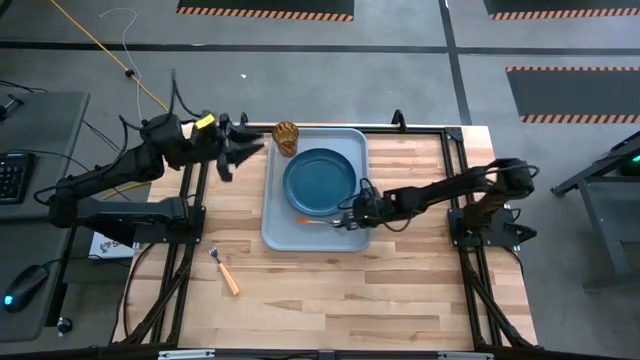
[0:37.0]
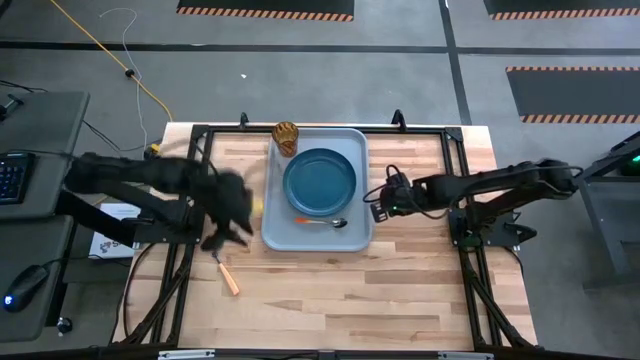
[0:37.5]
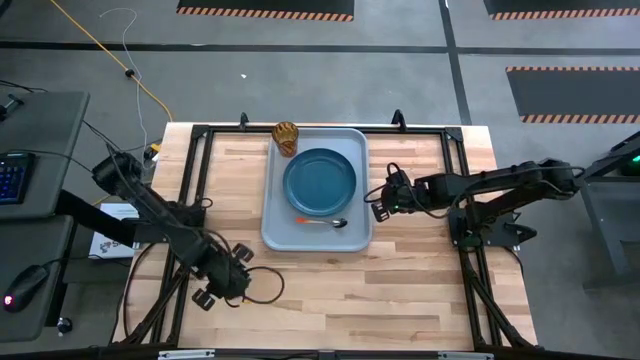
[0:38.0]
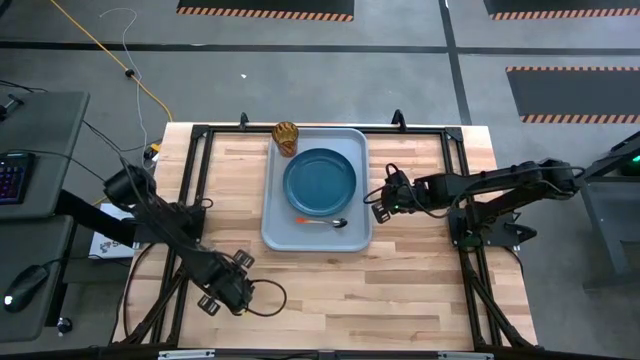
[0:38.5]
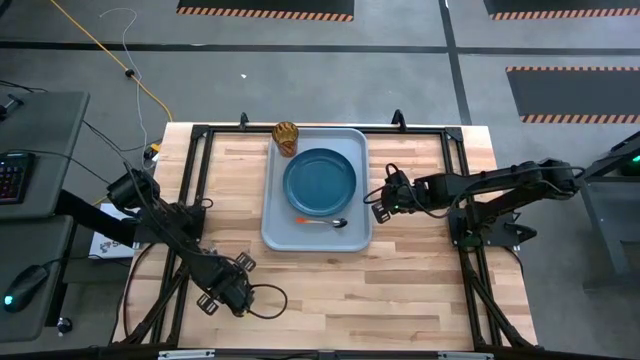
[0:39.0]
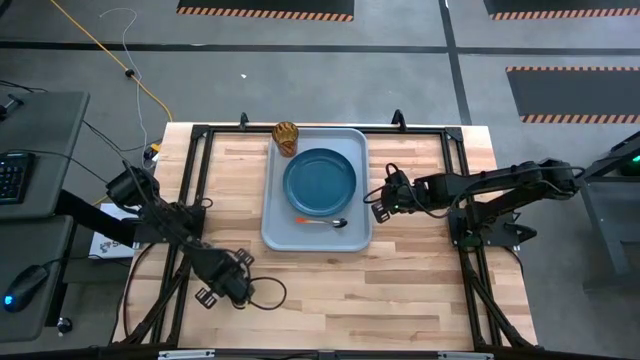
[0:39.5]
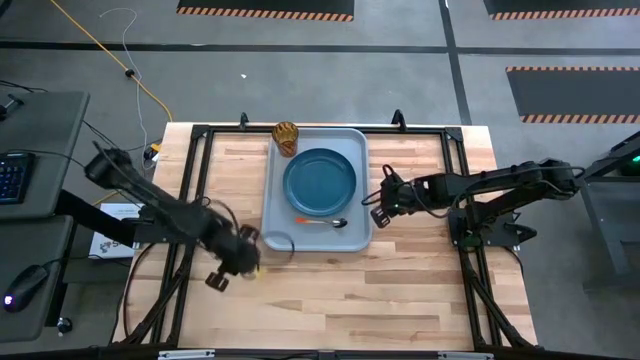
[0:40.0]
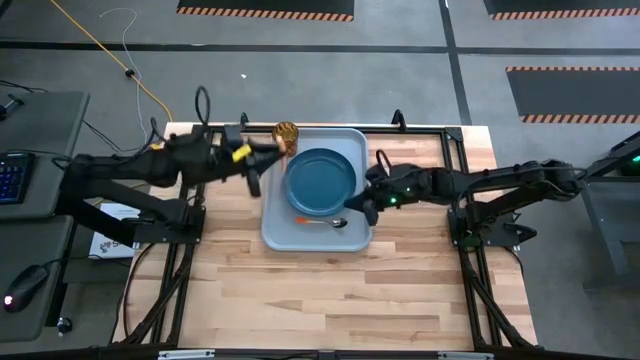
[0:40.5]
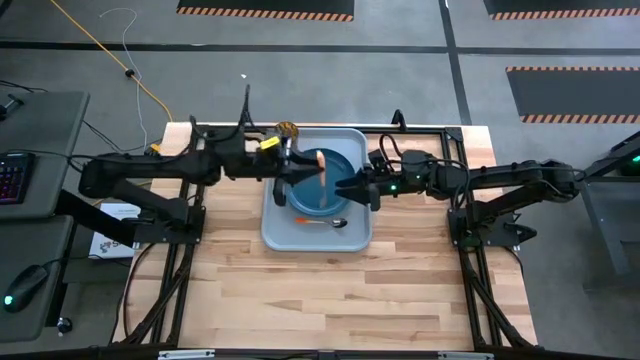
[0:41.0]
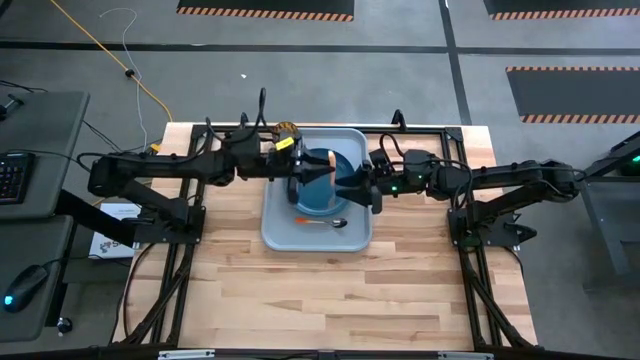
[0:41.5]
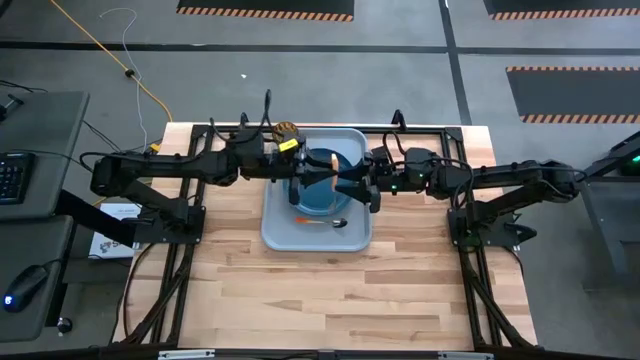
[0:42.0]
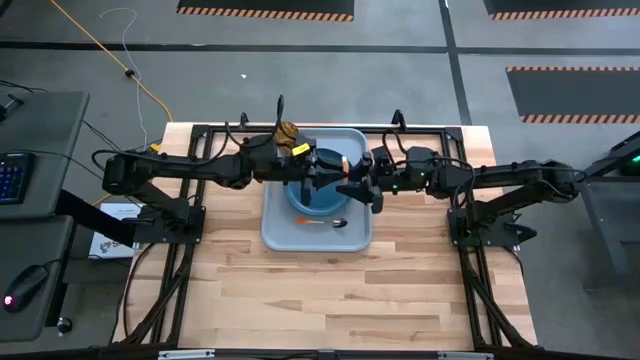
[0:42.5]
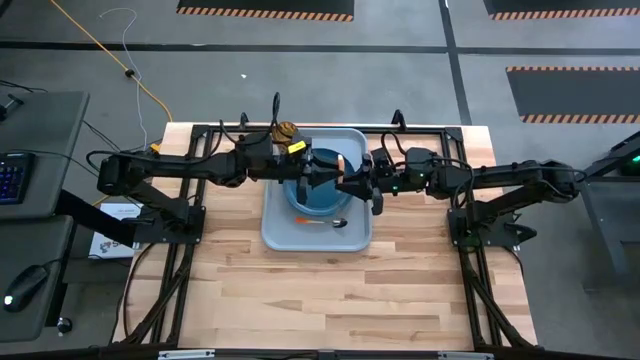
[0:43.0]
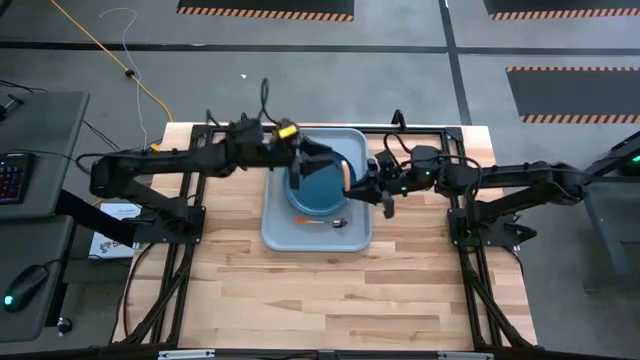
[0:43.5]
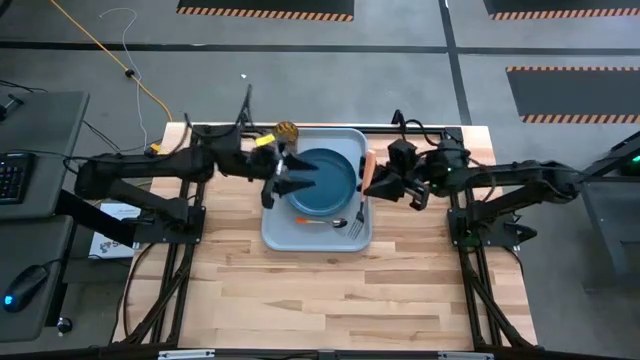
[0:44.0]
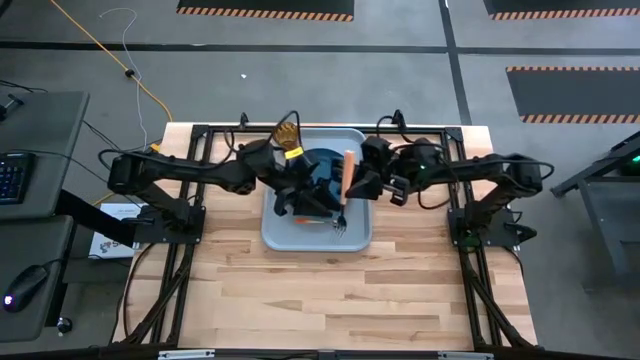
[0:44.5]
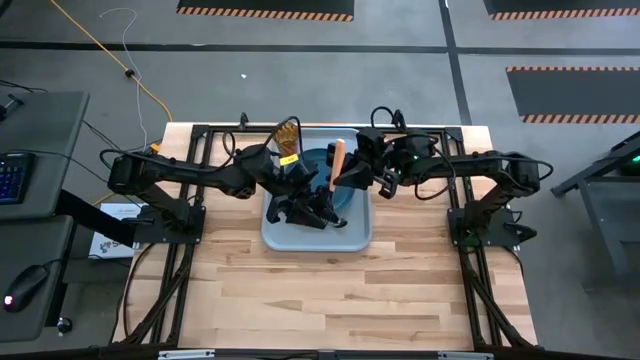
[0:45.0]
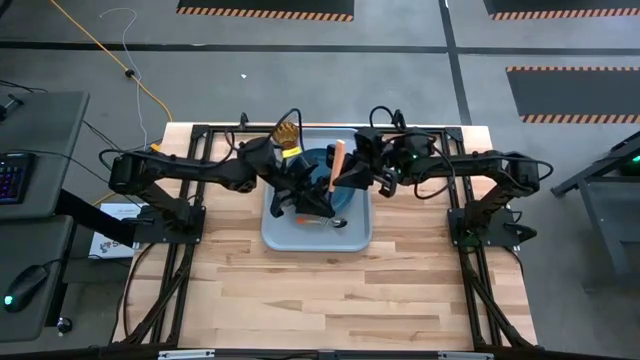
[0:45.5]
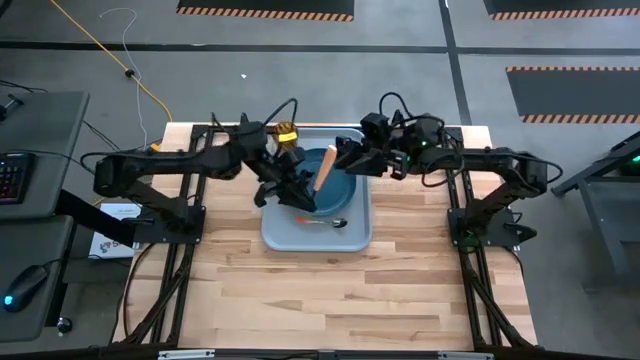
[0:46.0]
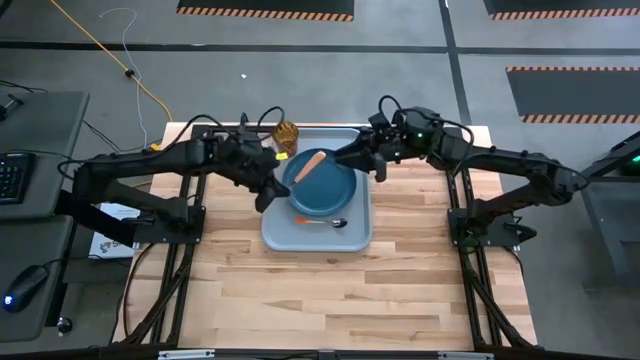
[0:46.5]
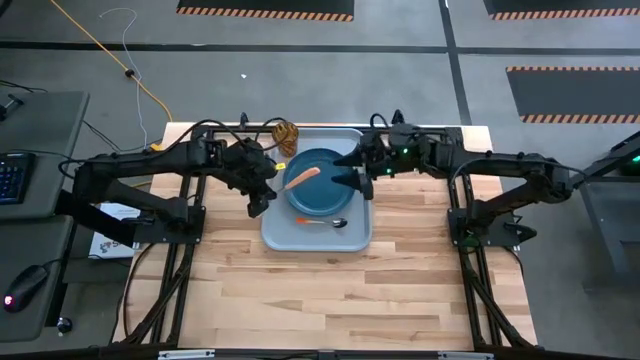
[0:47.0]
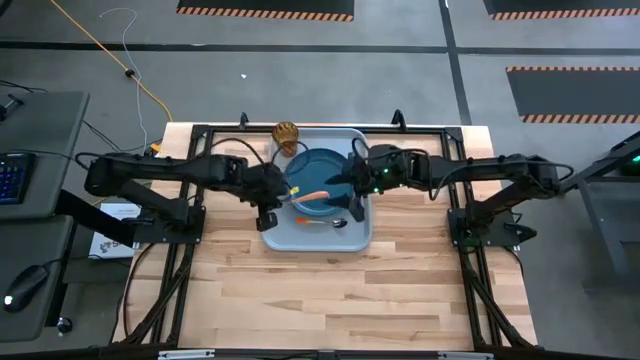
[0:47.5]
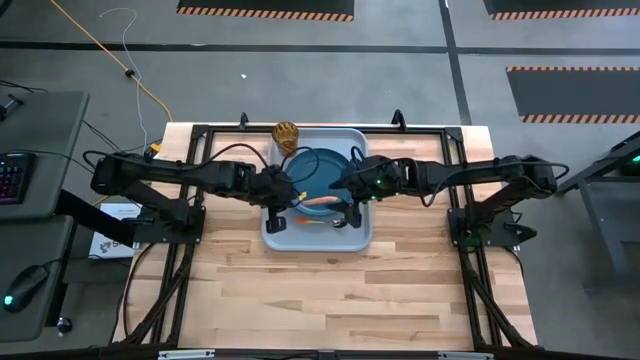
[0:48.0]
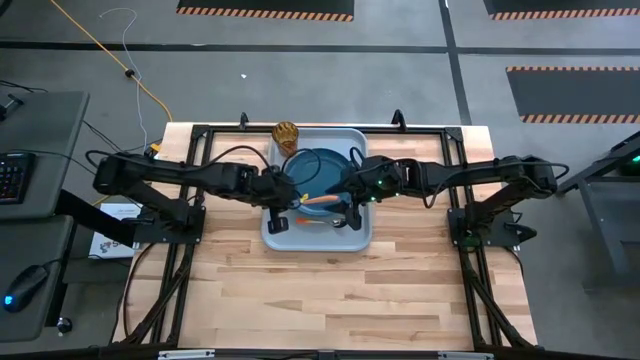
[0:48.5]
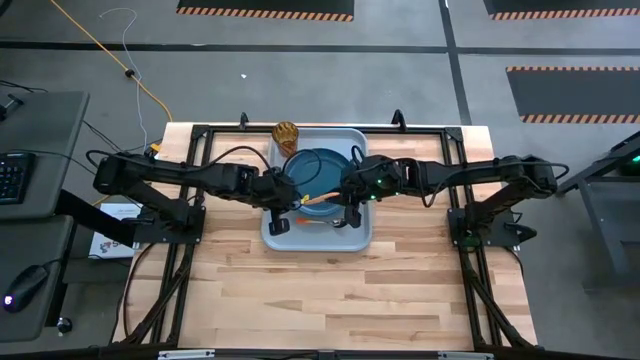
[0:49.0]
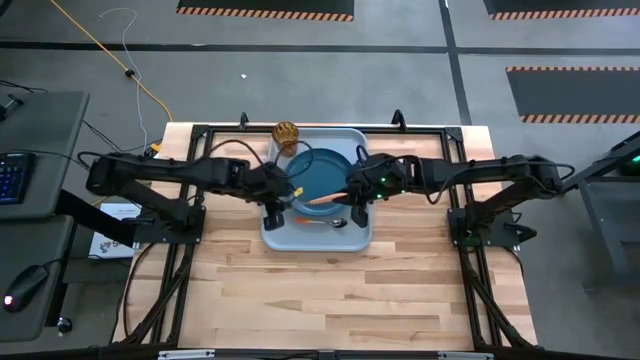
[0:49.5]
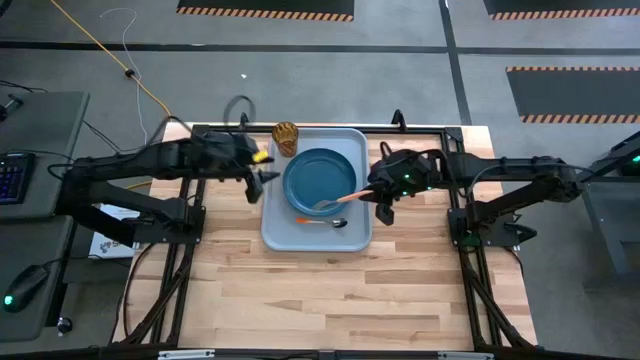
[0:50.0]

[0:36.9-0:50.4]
Task: Pick and place plate/cup/fork/spoon on tray
Put the orange fork on the bottom side of the light blue tray next to the orange spoon

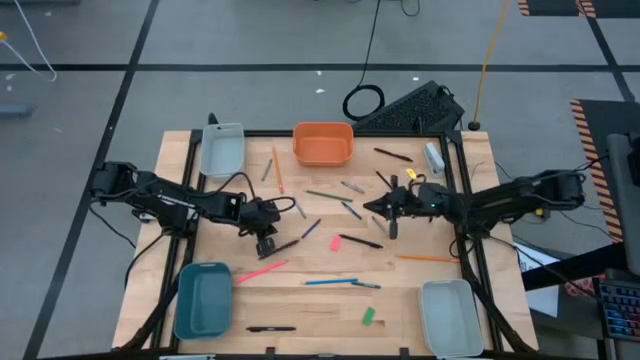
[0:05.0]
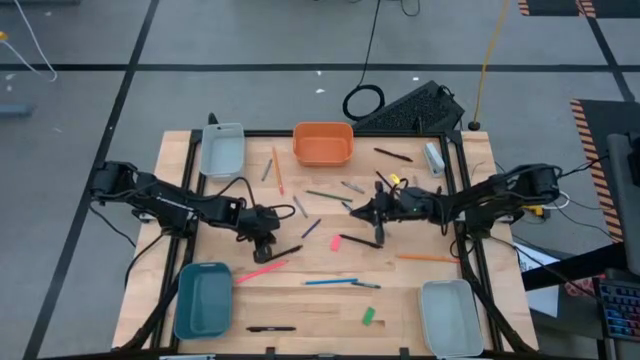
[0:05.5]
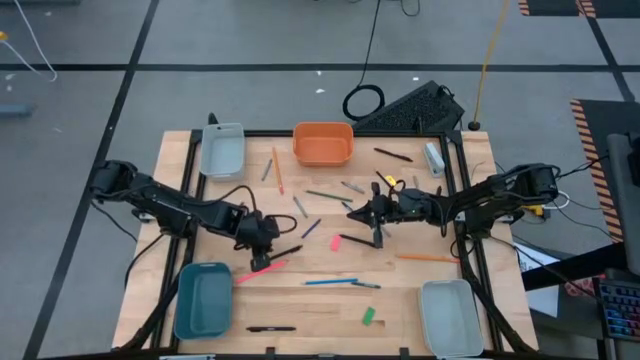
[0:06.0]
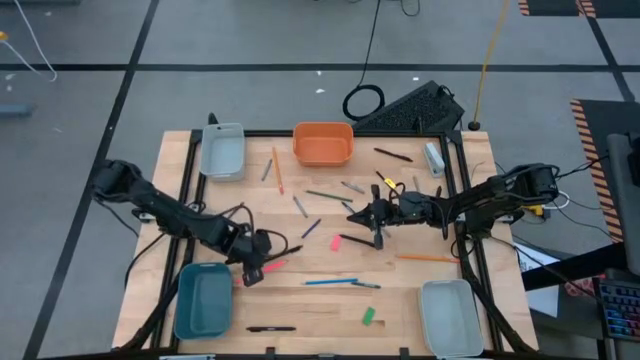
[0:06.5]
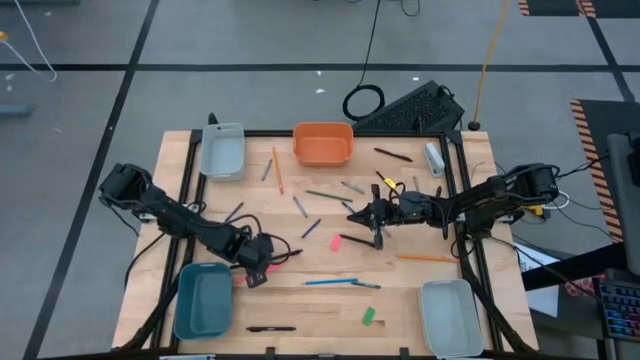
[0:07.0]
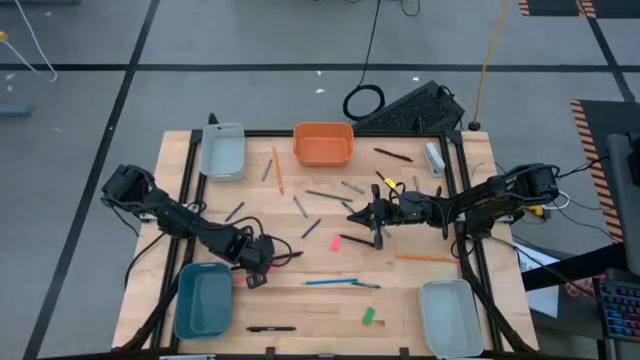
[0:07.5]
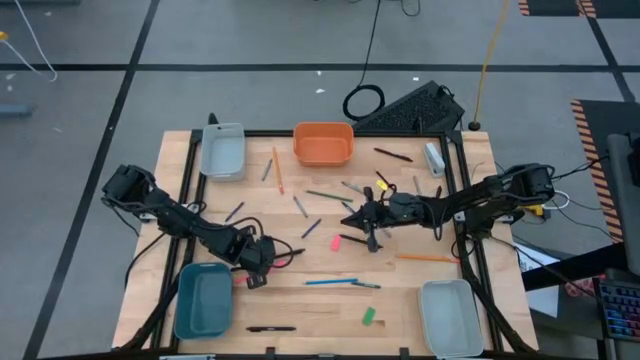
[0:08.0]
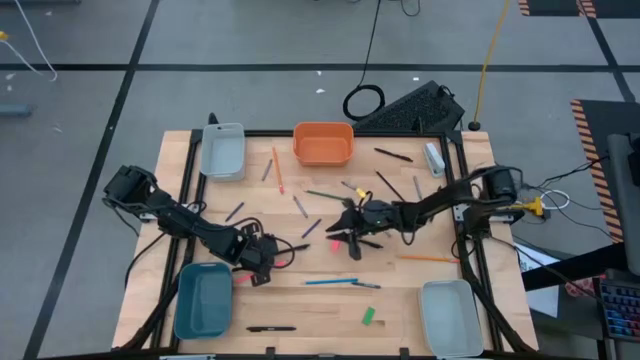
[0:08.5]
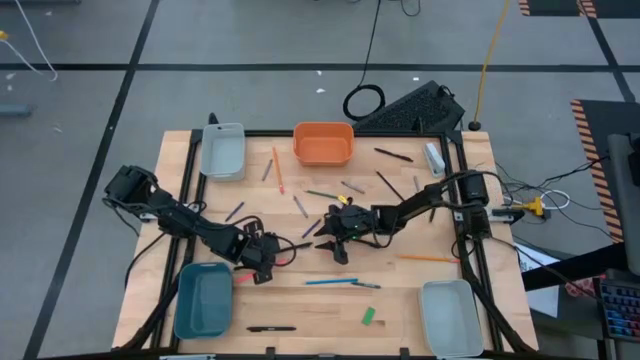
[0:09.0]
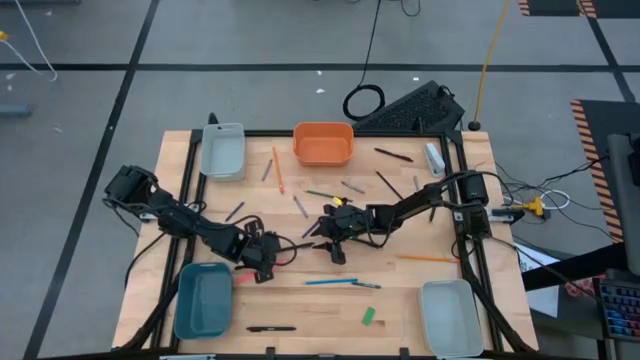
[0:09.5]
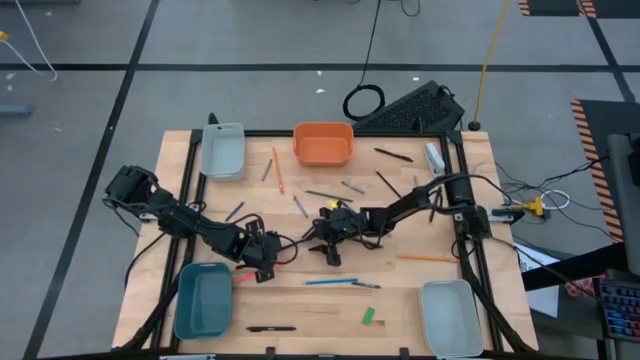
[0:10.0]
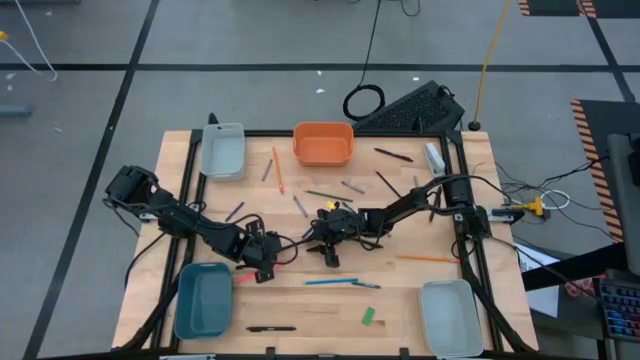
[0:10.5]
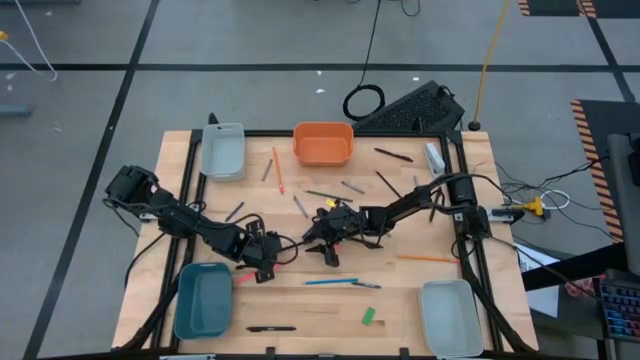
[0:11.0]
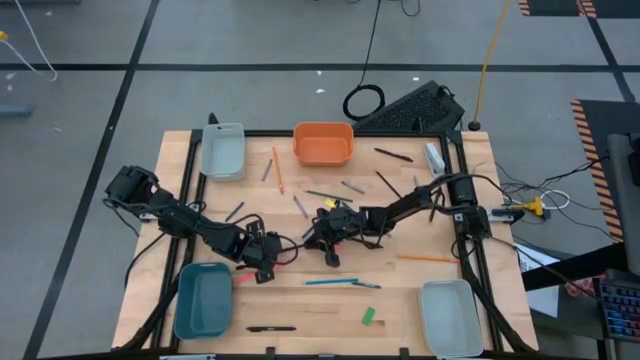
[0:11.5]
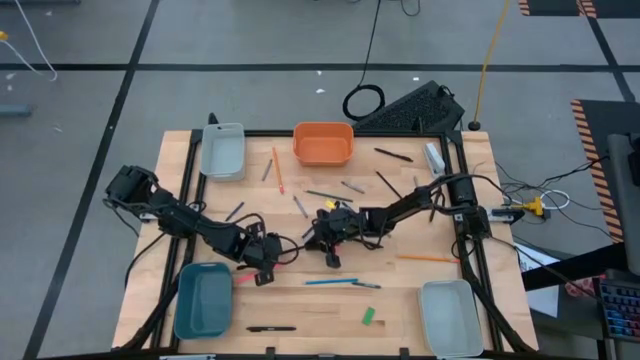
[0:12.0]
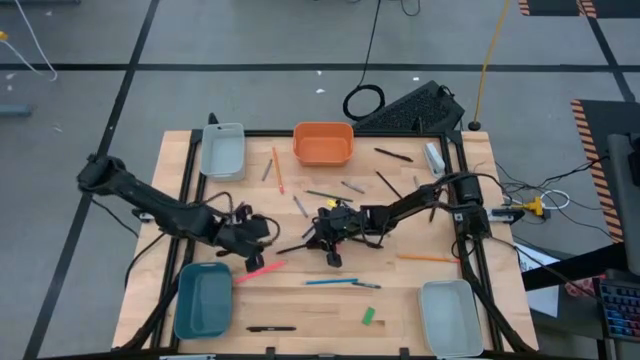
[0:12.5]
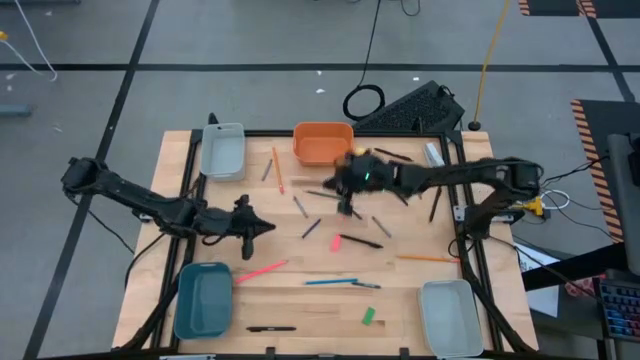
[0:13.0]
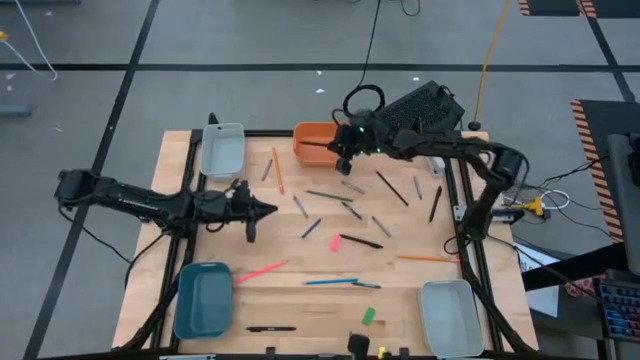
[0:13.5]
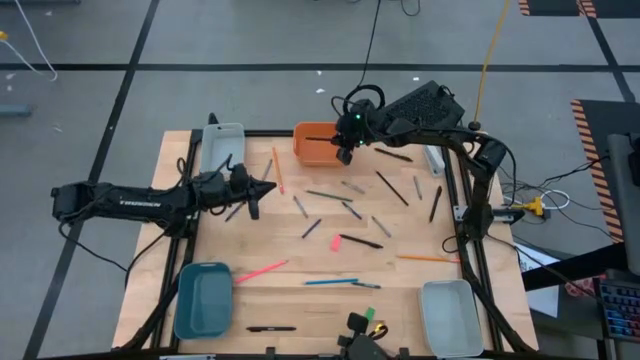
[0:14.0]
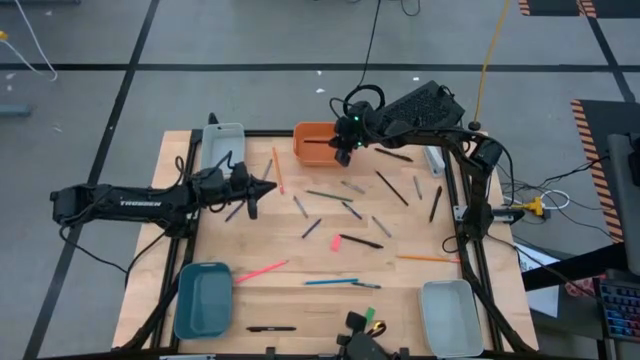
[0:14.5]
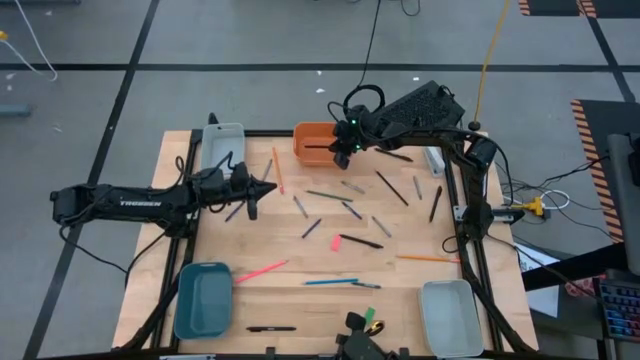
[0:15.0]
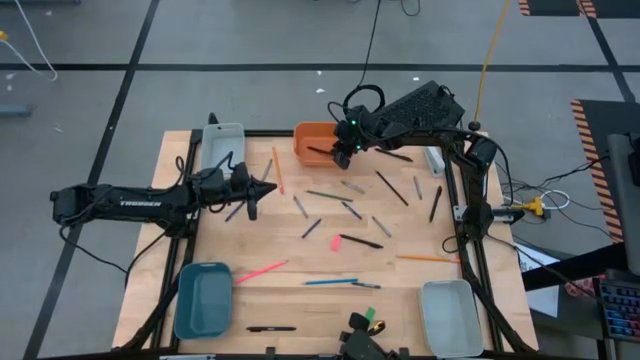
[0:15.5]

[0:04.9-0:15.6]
Task: Sort crayons/erasers/pens/pencils in bins
Put the black pen into the orange bin
